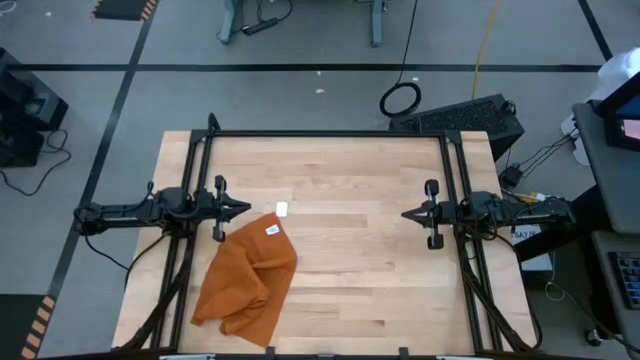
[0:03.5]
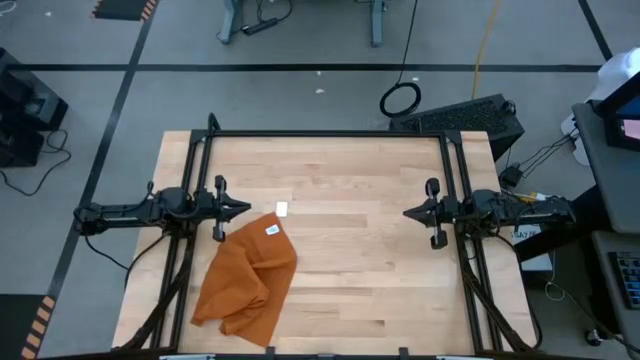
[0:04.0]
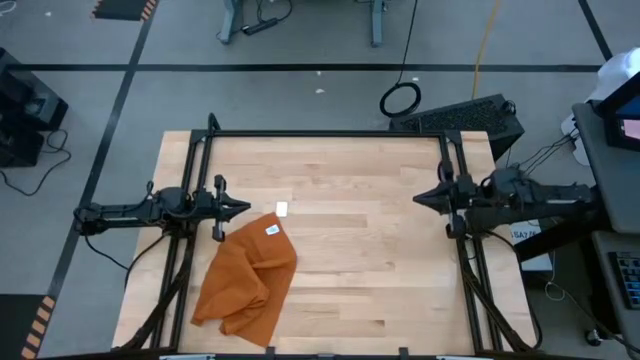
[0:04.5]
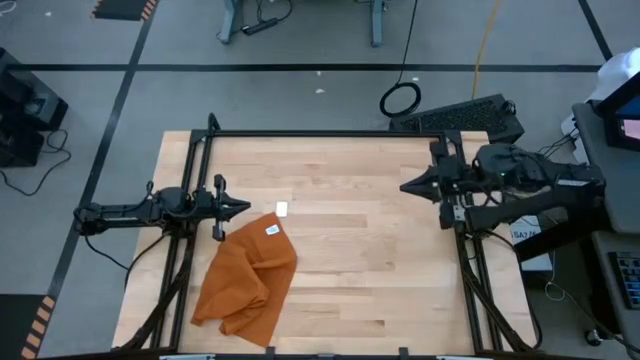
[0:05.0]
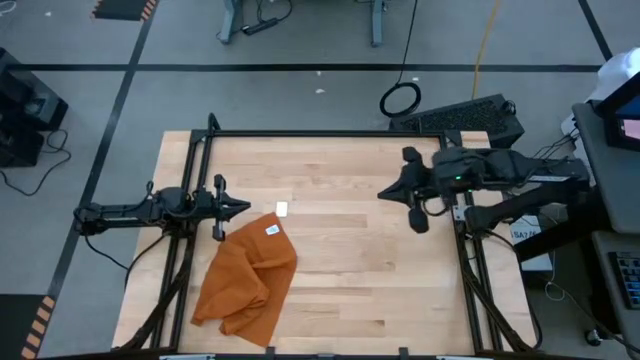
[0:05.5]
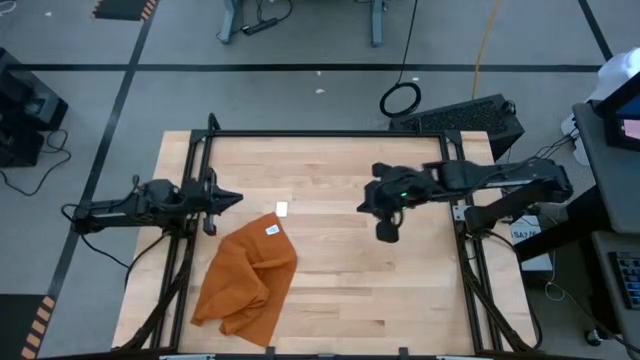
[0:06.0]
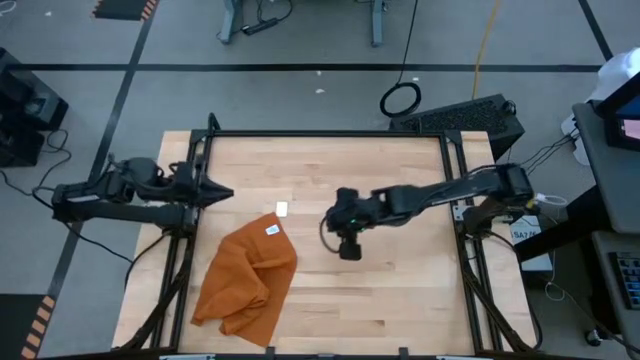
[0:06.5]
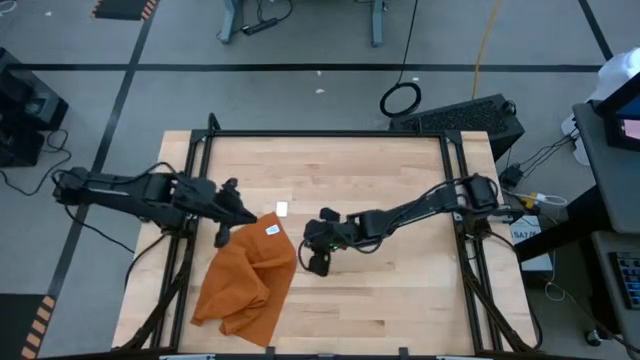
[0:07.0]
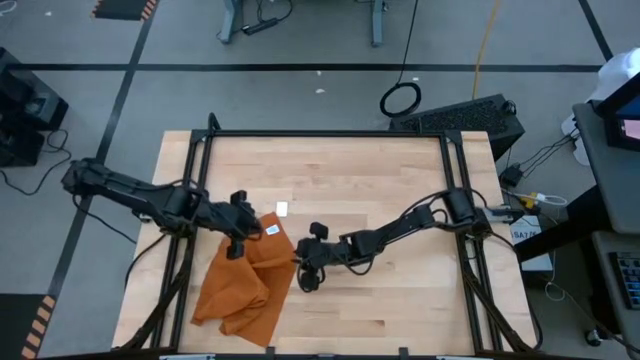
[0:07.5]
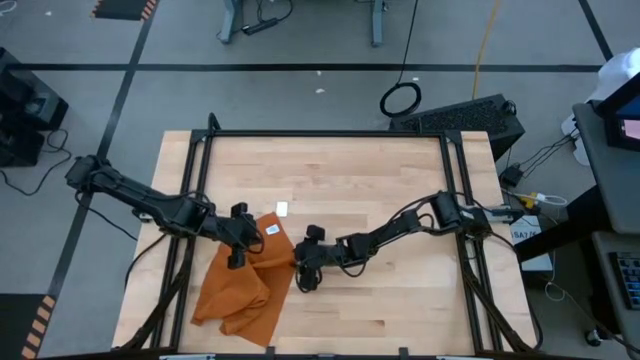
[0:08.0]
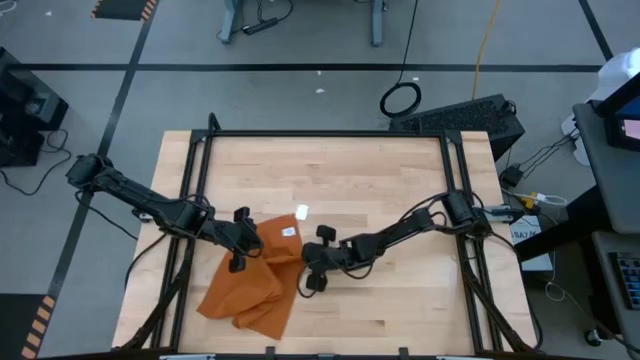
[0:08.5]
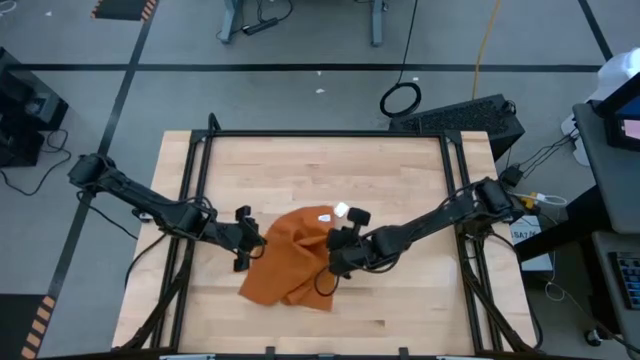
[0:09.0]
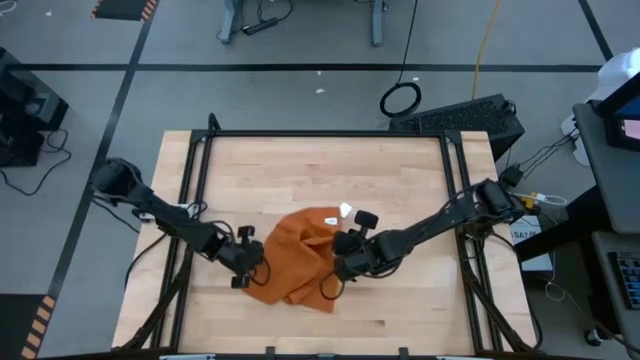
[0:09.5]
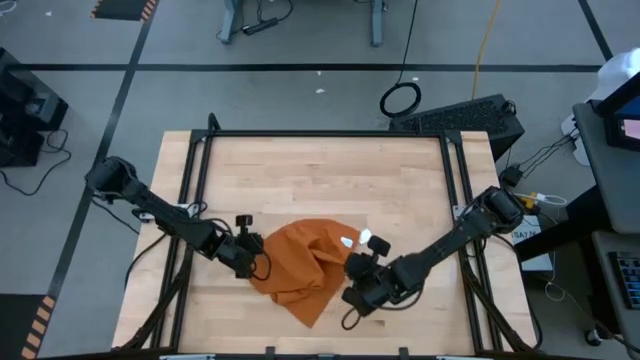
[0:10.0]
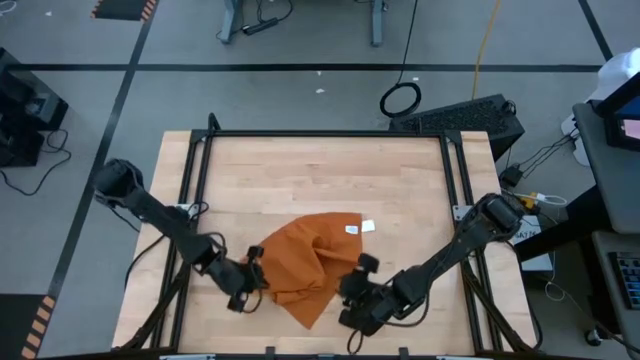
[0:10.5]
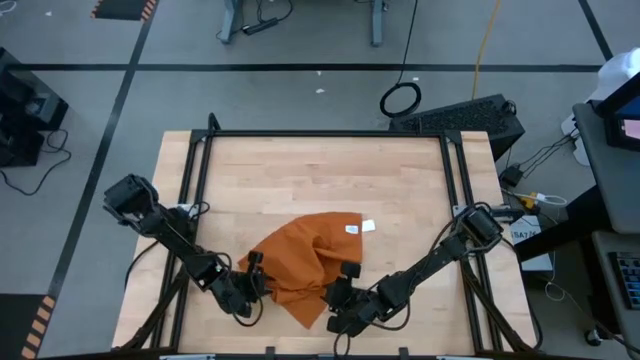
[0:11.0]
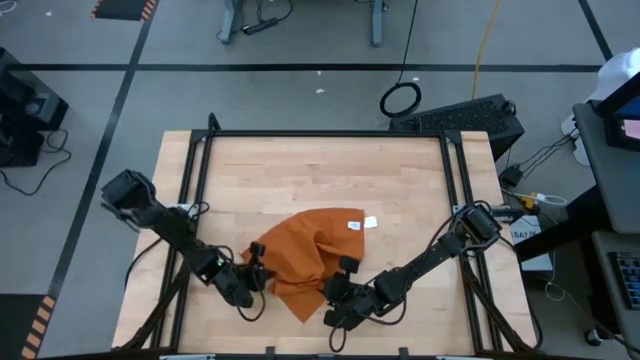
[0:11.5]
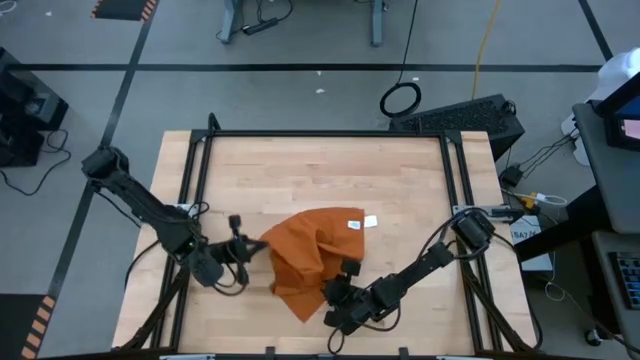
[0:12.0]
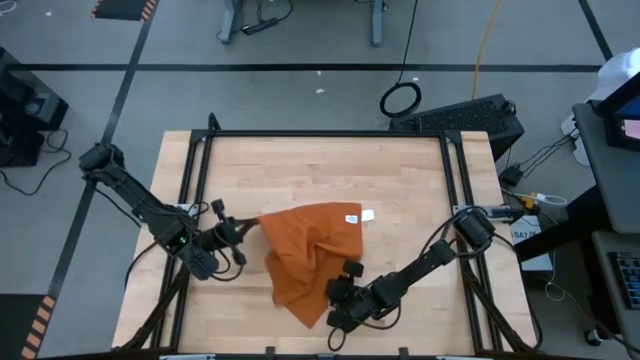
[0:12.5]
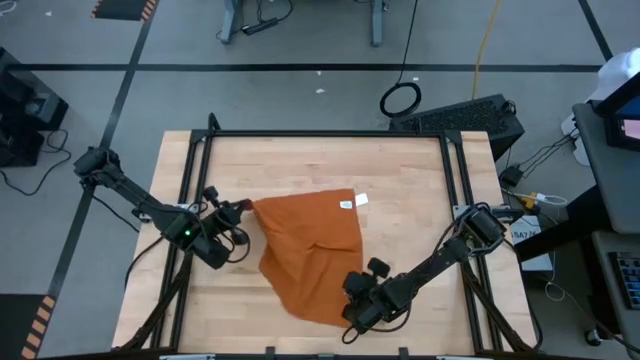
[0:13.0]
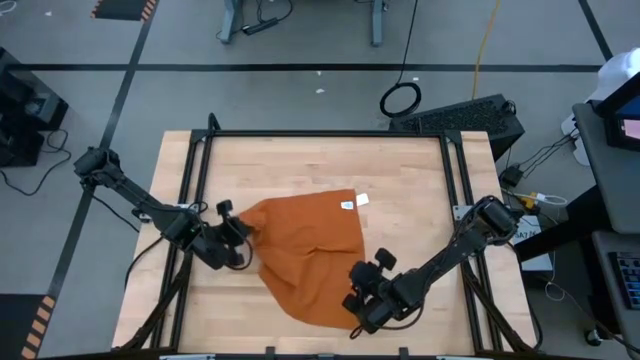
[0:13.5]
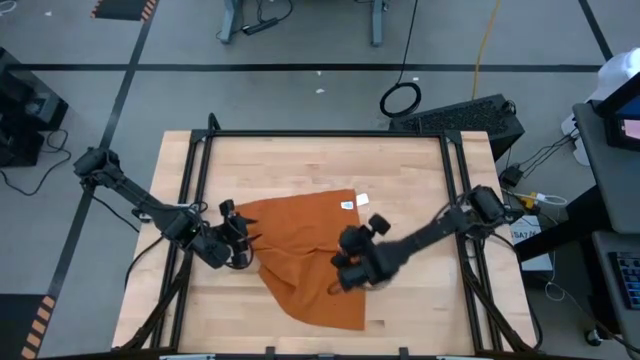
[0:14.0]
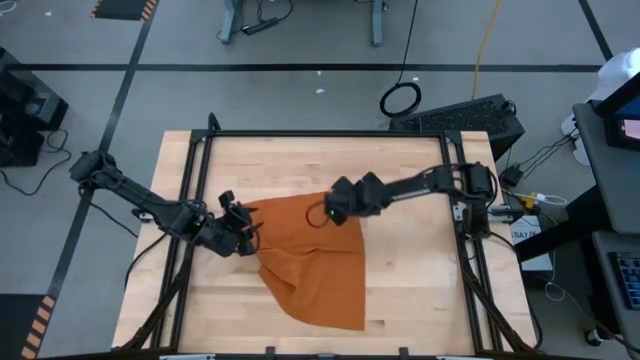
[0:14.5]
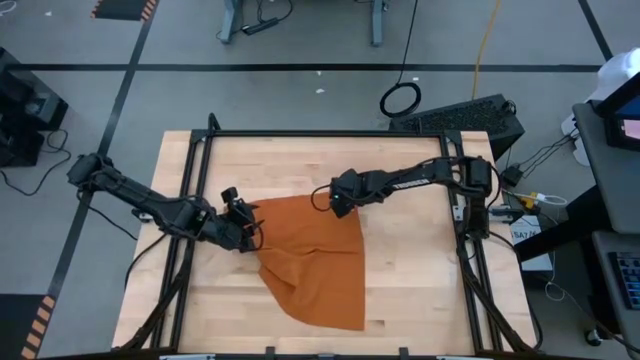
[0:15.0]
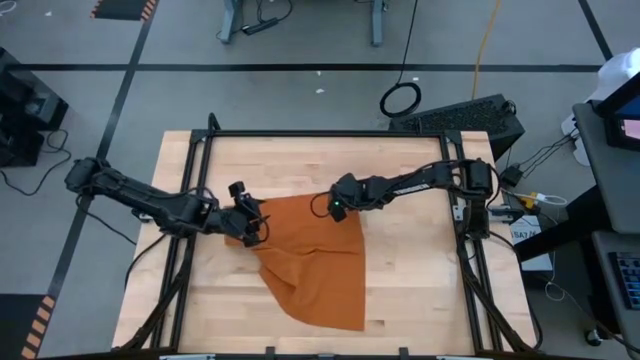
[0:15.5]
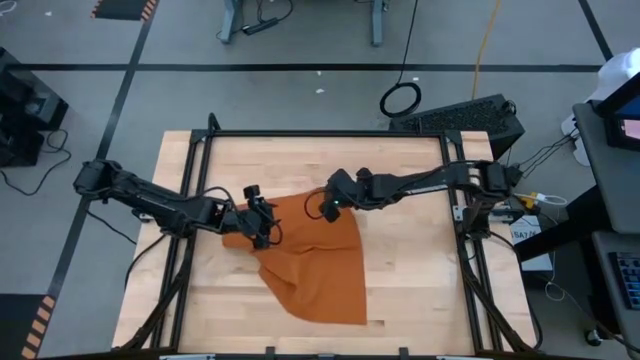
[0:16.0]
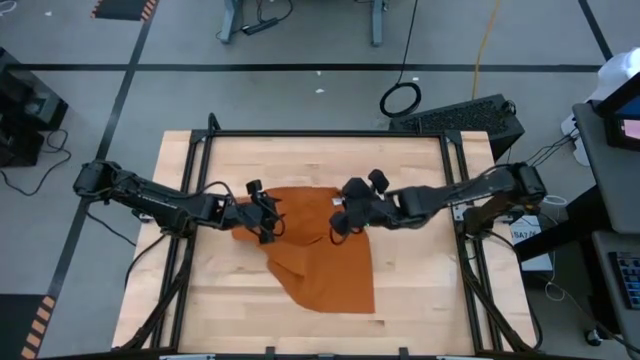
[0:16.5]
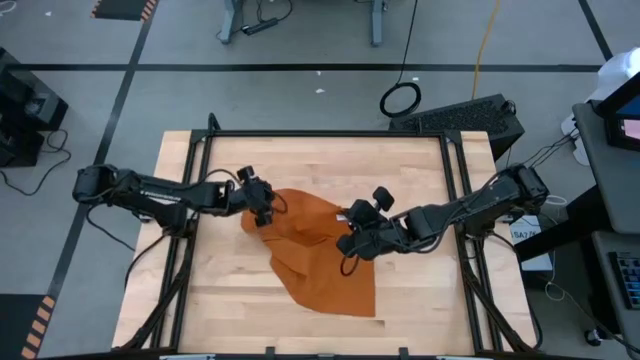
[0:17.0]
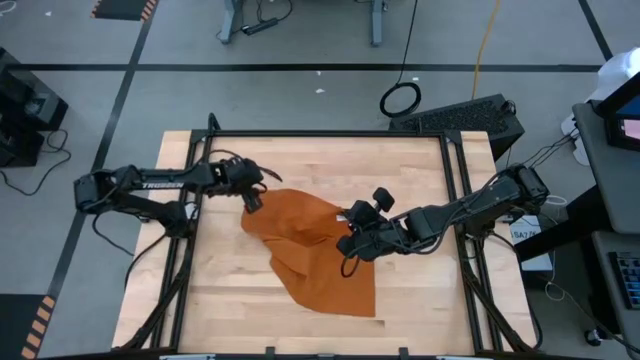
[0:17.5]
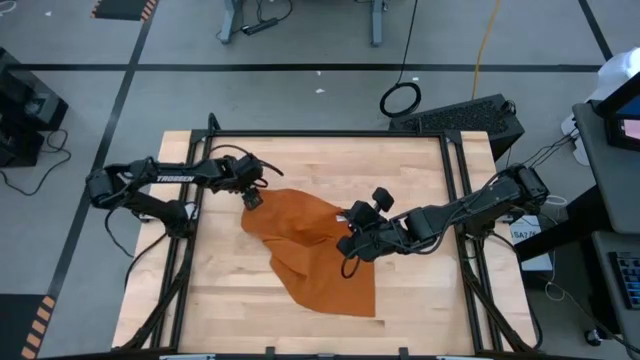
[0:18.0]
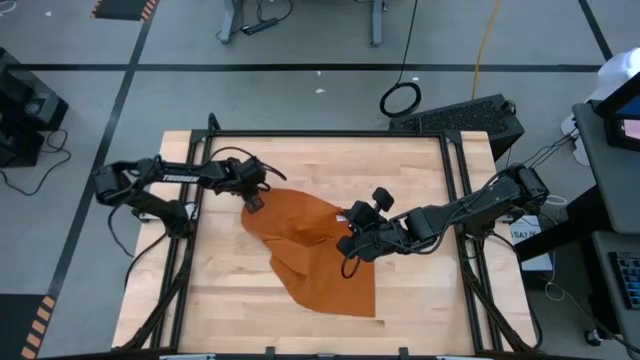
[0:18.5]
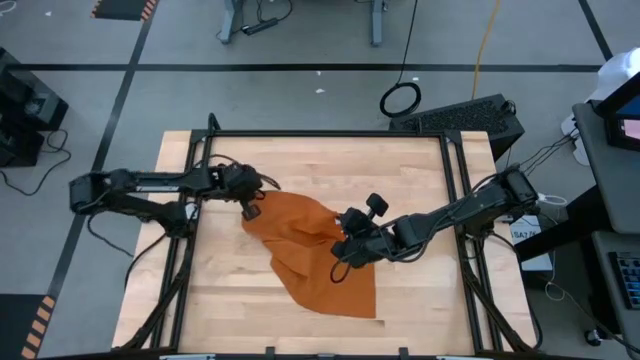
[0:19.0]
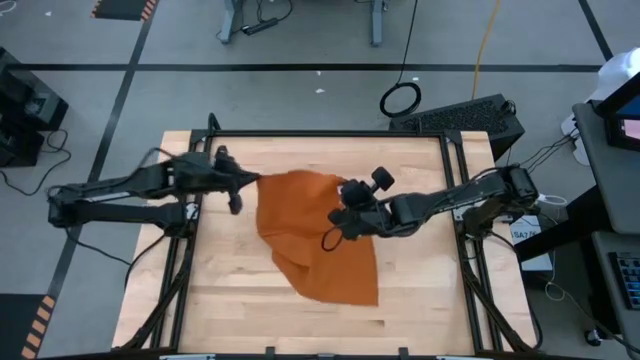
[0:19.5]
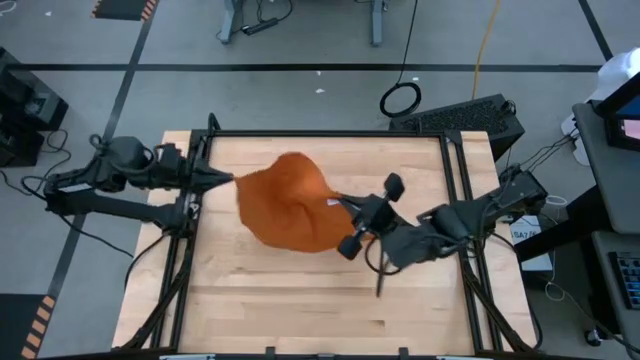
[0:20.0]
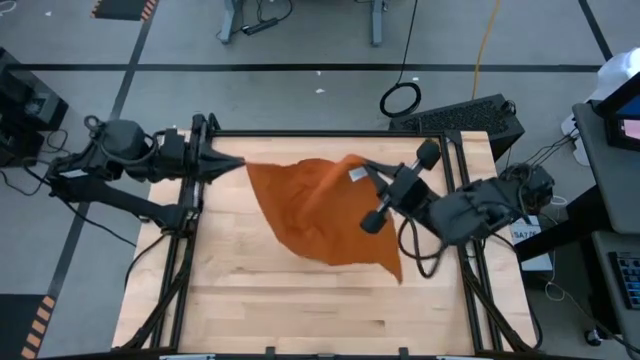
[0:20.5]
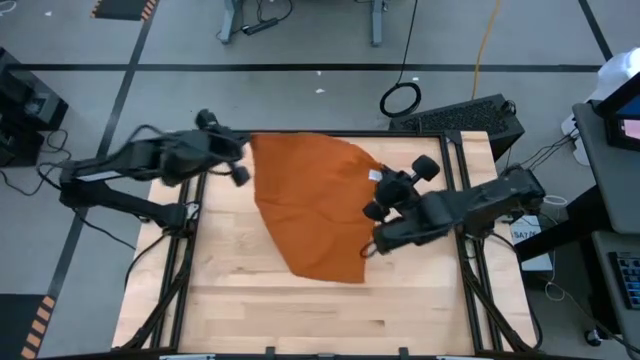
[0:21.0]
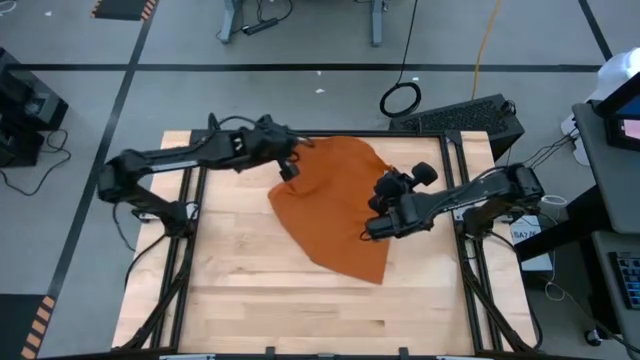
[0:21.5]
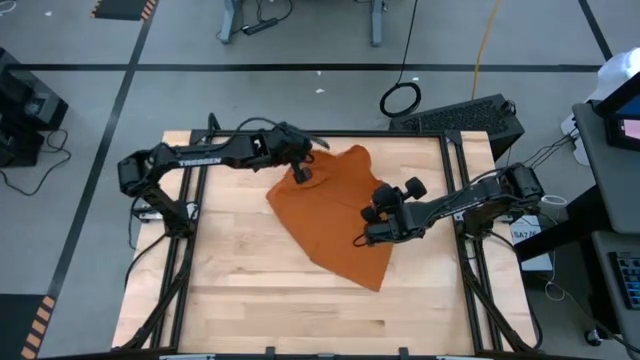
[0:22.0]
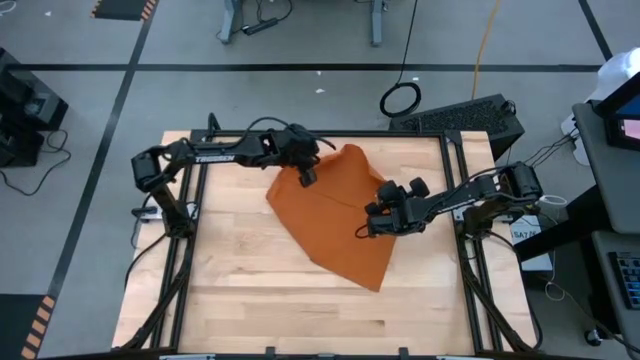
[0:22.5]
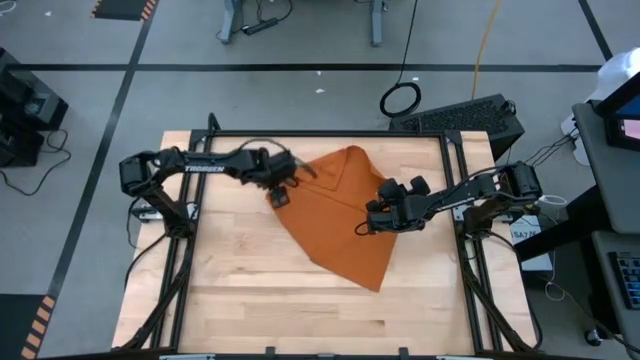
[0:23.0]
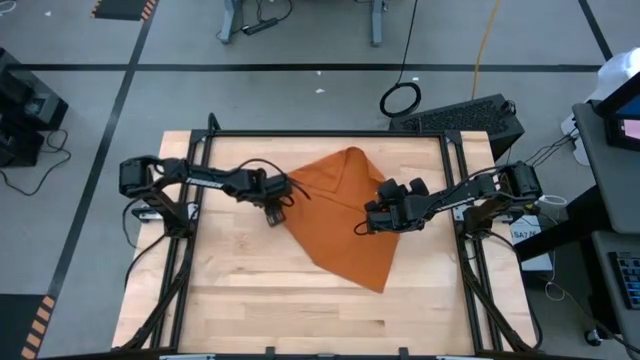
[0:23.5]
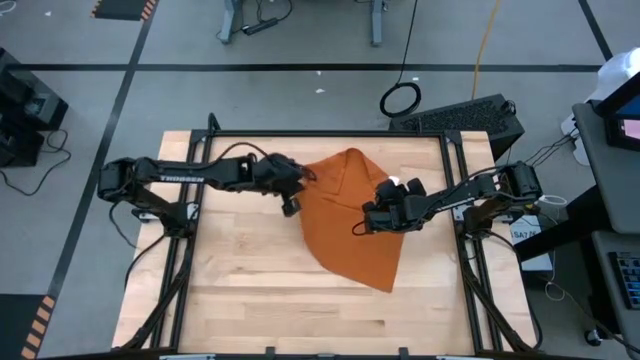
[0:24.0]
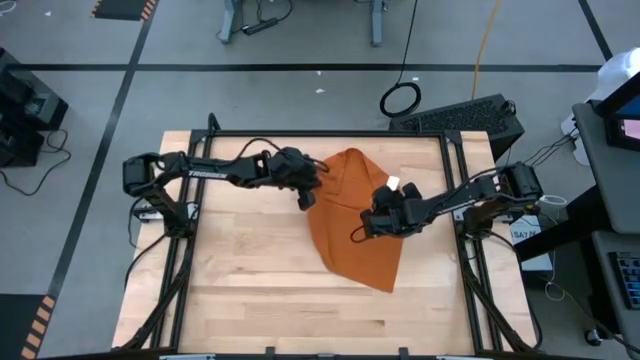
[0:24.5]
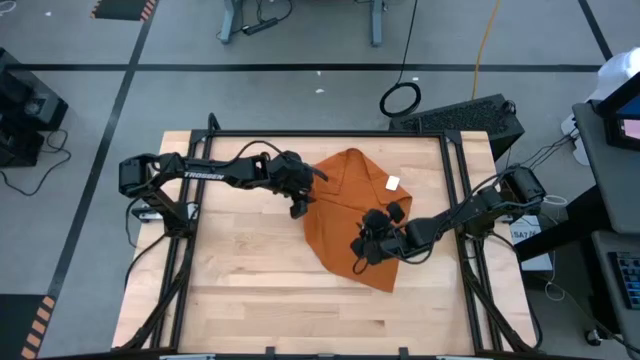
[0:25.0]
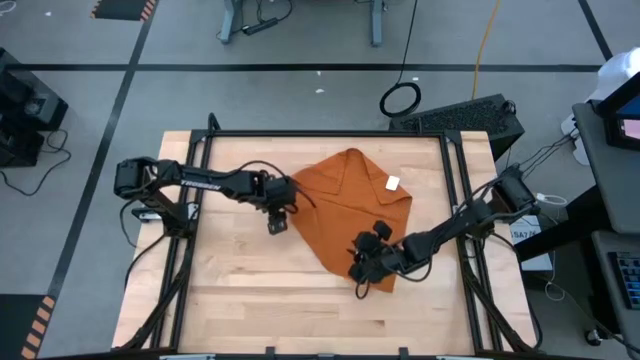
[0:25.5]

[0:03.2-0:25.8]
Task: Roll towel into tight, uniform cylinder
Fold the brown towel
